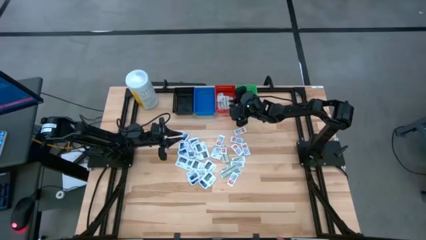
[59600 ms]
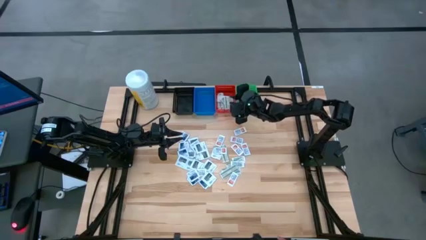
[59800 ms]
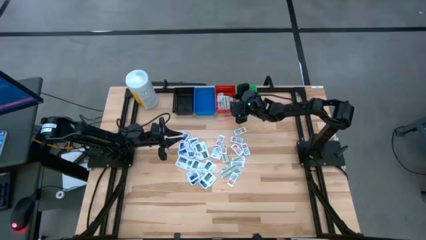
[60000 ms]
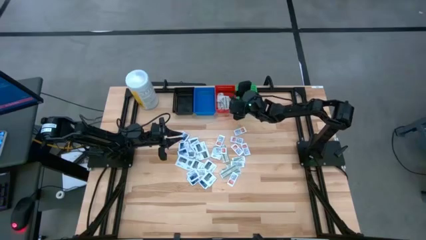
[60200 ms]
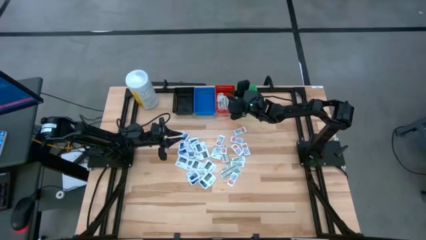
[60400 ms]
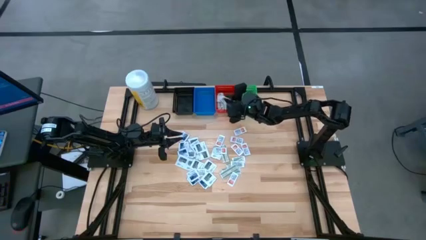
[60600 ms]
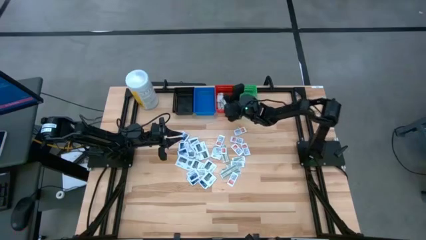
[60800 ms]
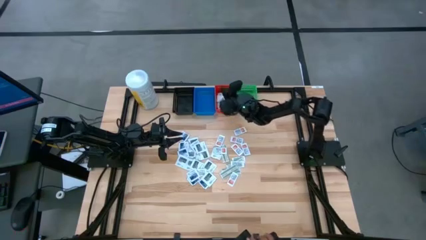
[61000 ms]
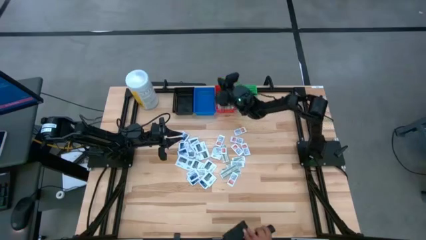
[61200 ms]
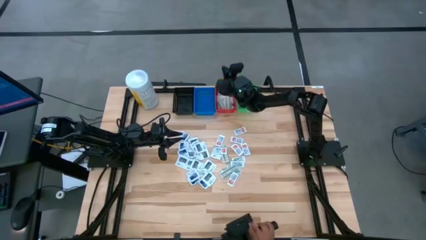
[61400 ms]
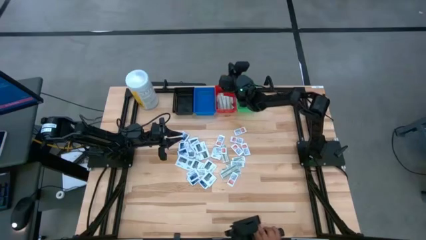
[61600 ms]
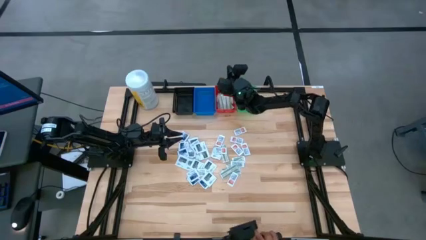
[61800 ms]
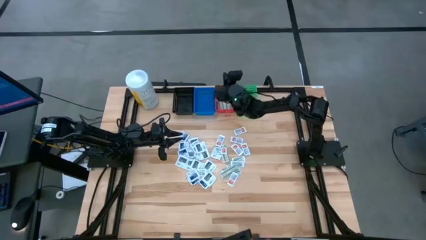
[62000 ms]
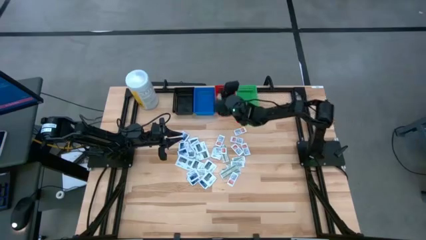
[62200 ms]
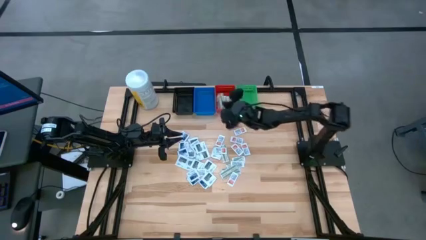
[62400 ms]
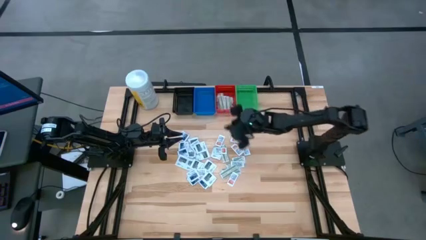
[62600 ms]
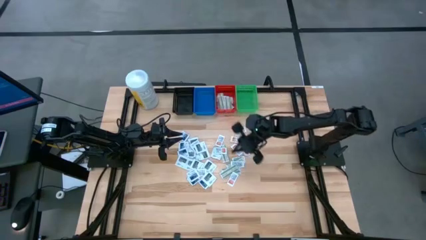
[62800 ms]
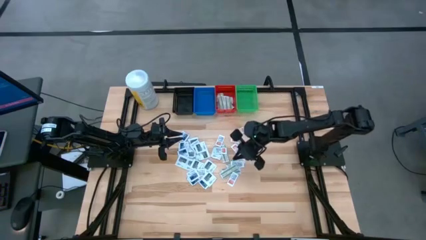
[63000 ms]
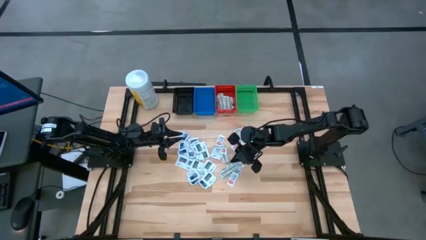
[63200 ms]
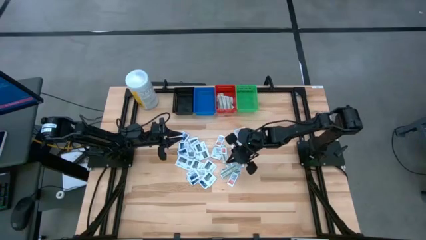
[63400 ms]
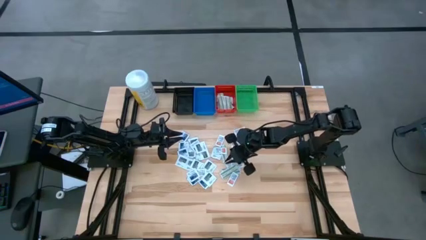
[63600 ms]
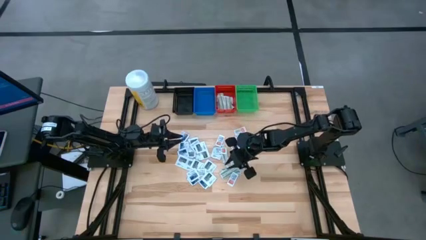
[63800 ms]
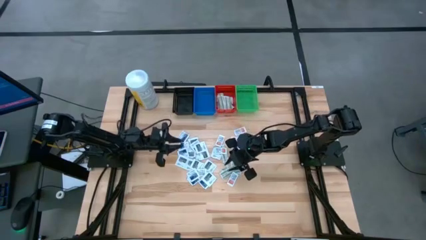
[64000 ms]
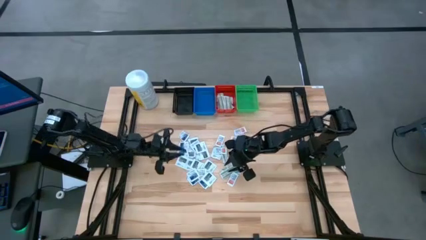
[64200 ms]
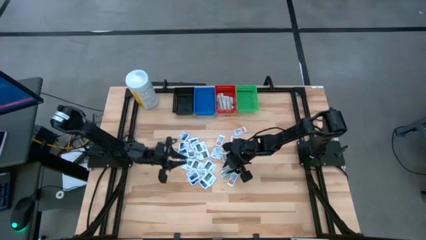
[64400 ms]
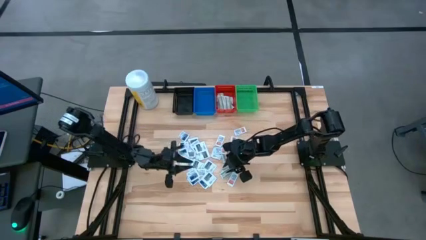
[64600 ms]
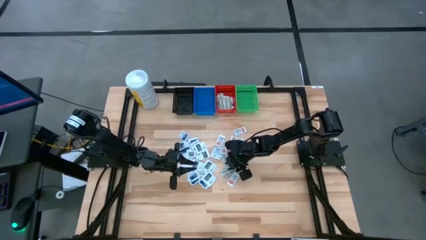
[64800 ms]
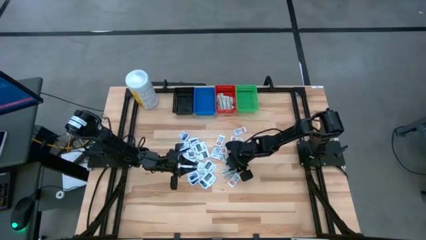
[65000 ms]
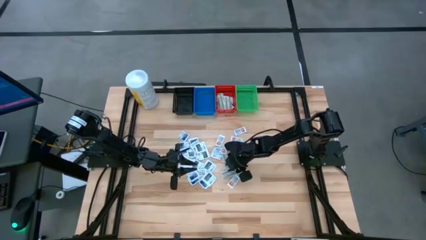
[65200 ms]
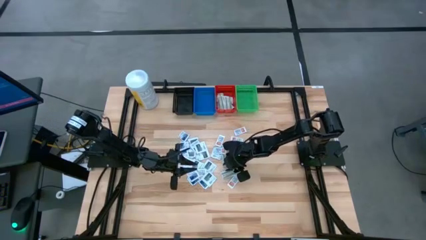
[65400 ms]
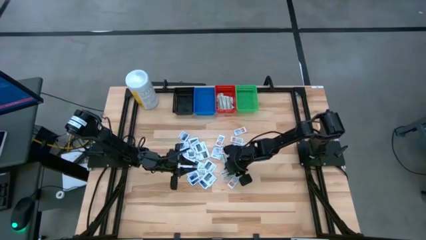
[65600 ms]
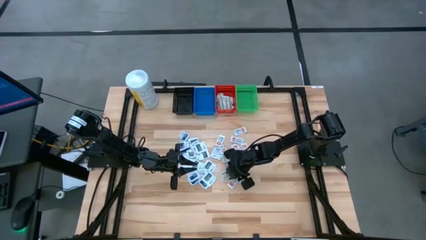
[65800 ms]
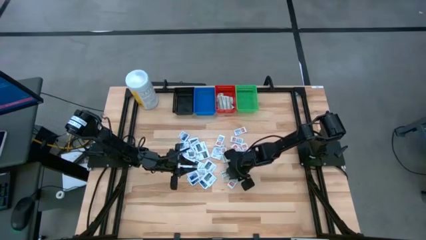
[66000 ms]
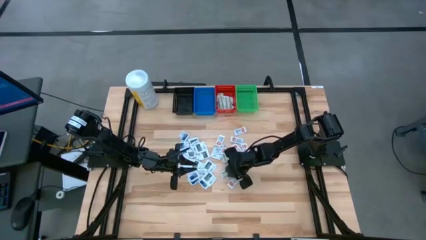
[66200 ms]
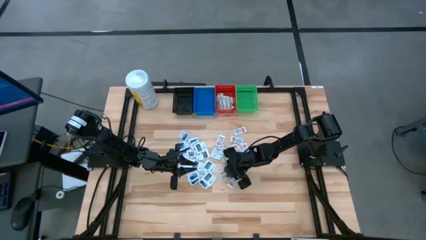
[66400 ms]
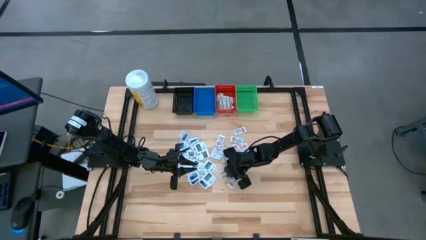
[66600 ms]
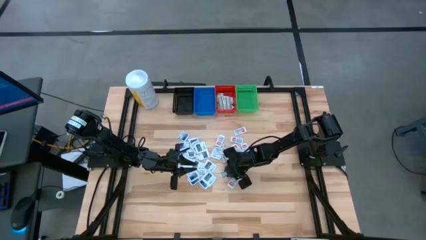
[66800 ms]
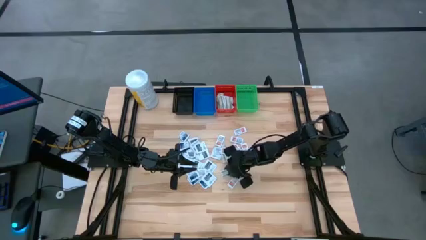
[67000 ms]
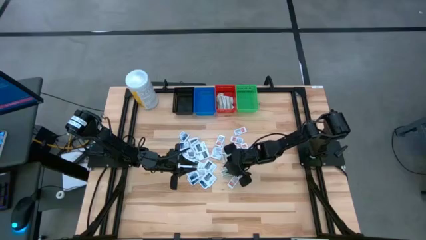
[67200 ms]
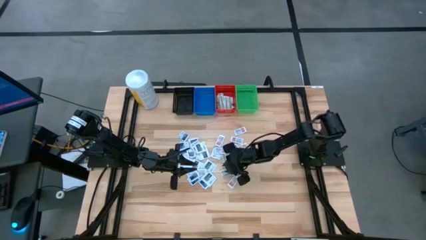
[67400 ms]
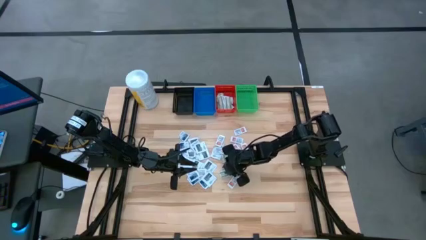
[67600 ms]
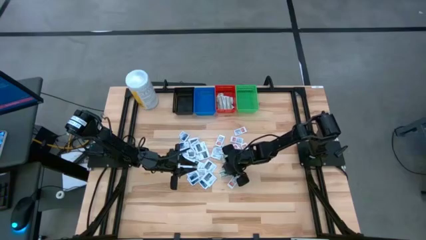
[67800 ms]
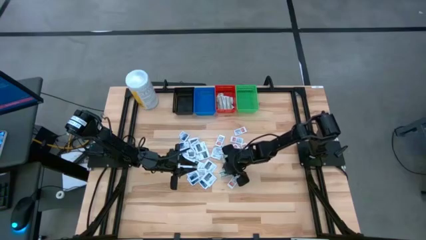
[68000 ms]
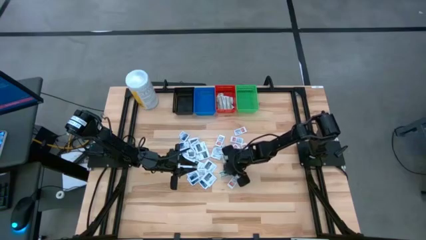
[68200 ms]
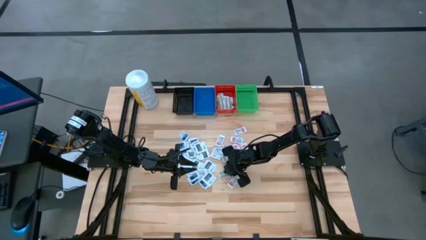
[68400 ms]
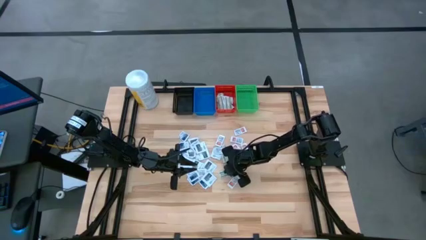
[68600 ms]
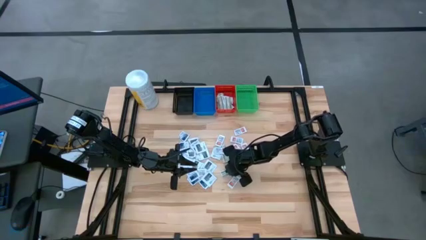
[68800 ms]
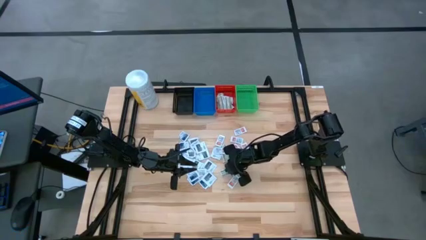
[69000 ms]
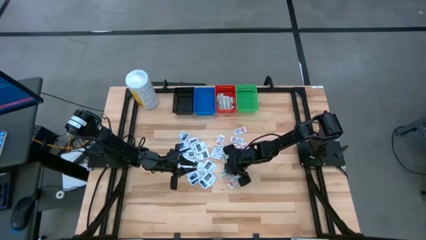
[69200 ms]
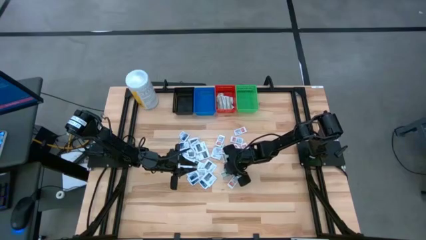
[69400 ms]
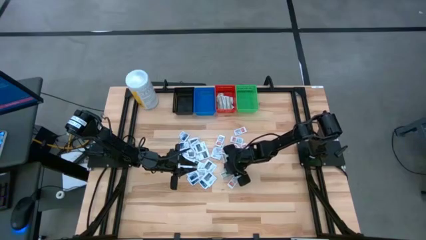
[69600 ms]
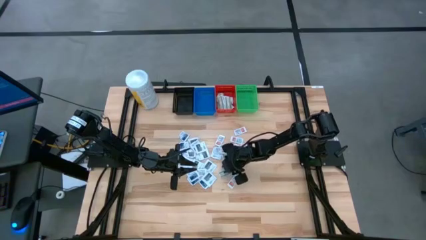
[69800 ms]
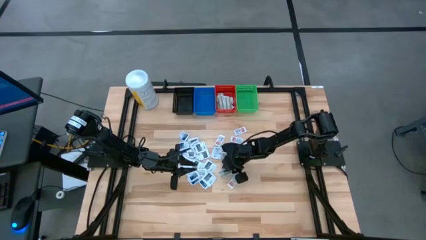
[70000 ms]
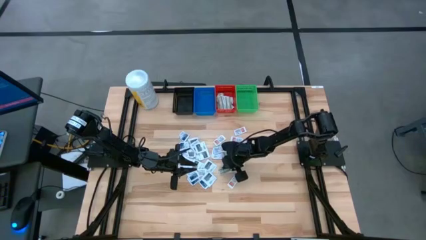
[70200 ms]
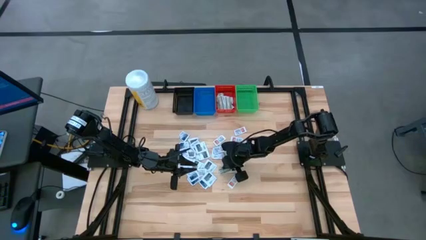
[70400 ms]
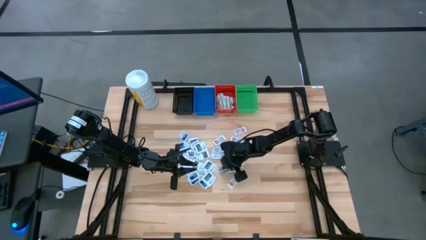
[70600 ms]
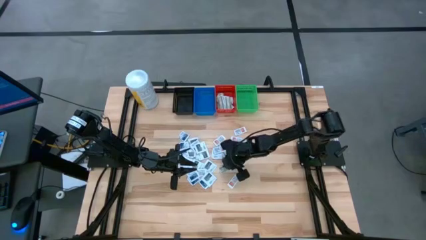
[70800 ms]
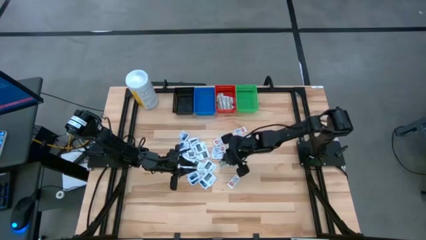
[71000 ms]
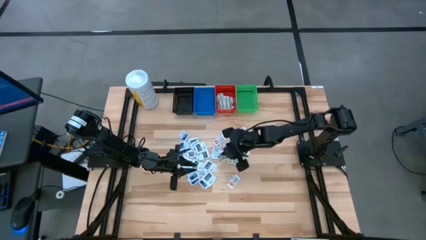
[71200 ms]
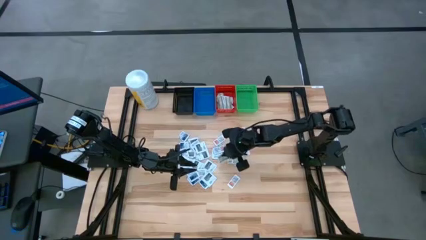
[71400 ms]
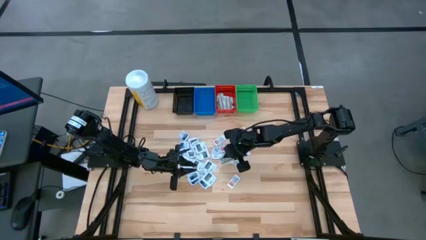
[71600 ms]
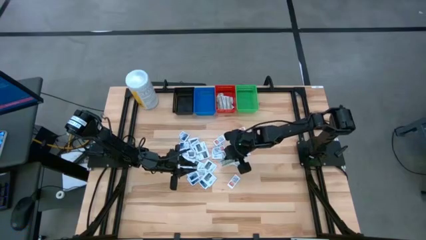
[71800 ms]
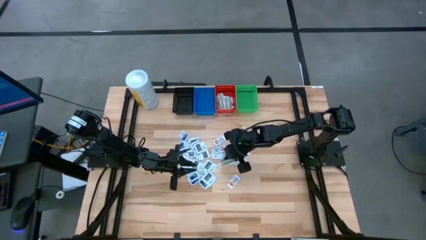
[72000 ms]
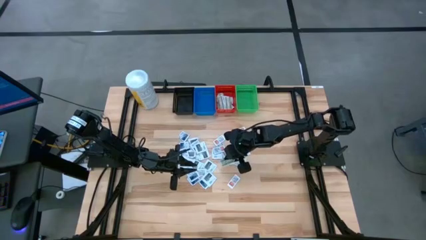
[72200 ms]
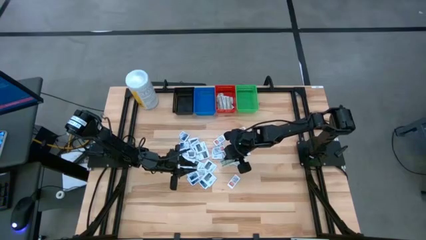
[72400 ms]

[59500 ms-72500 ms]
Task: Pick & Place First Aid Supplies
Put the green bandage pack into the red bin
